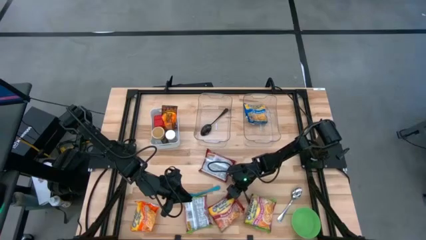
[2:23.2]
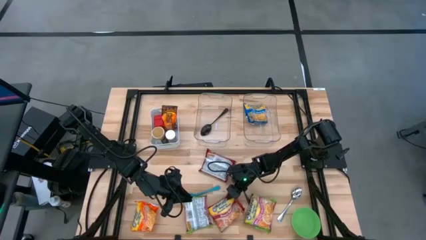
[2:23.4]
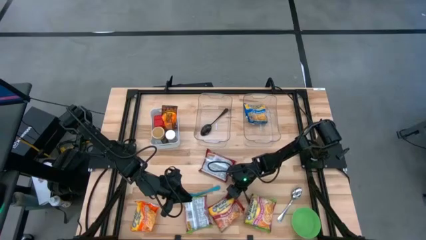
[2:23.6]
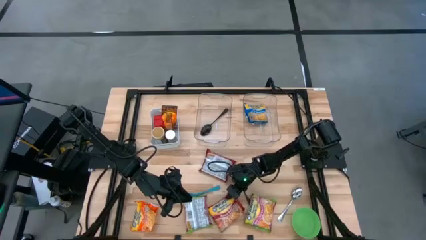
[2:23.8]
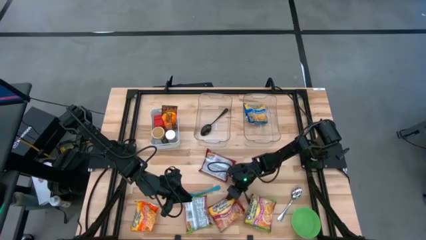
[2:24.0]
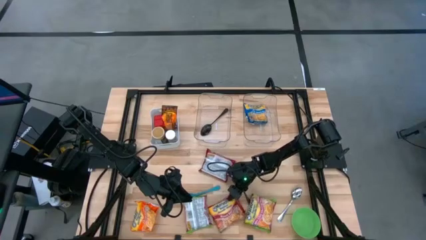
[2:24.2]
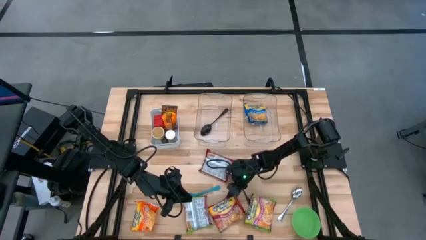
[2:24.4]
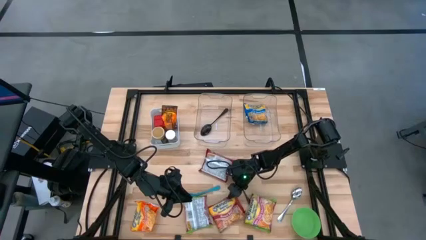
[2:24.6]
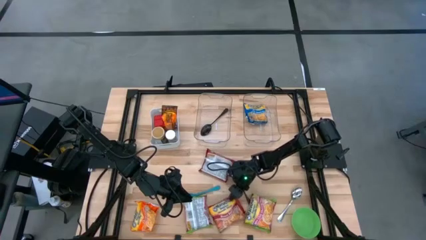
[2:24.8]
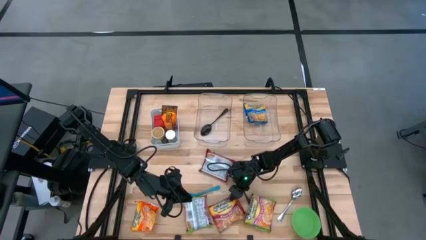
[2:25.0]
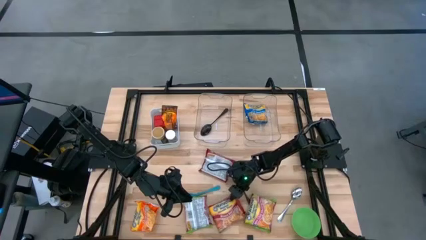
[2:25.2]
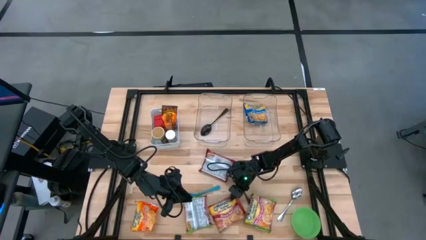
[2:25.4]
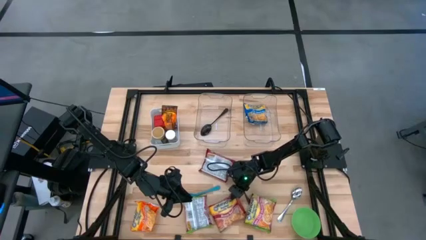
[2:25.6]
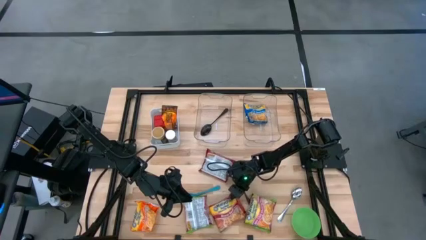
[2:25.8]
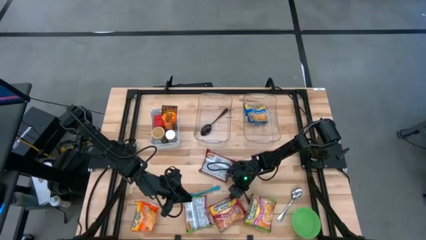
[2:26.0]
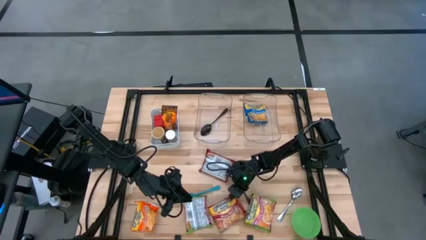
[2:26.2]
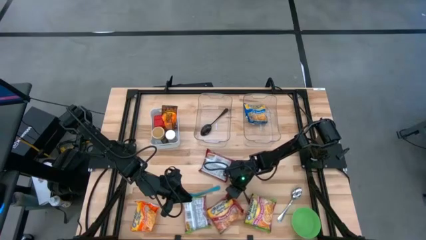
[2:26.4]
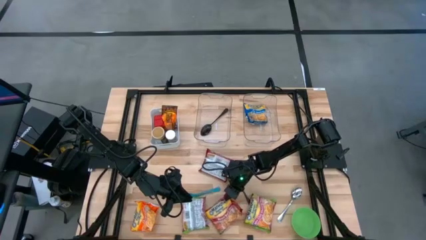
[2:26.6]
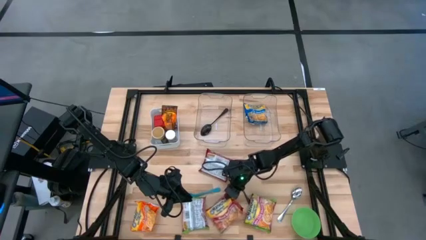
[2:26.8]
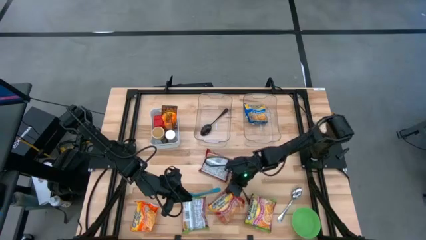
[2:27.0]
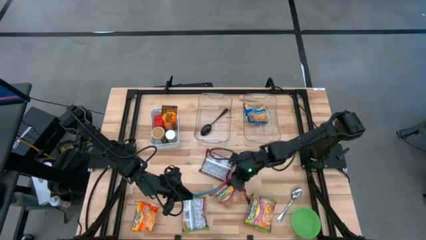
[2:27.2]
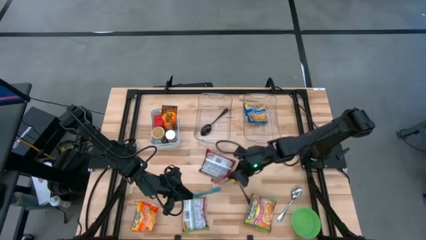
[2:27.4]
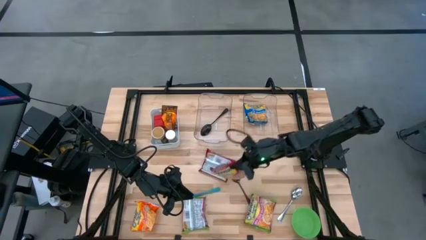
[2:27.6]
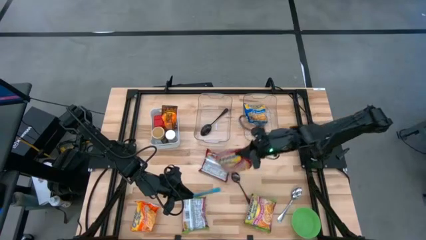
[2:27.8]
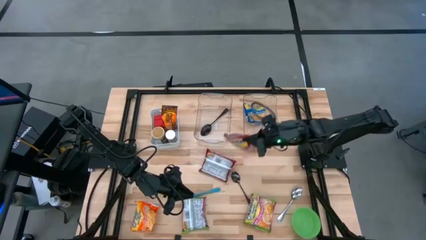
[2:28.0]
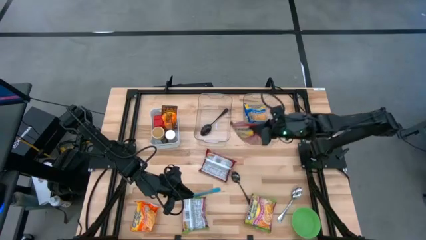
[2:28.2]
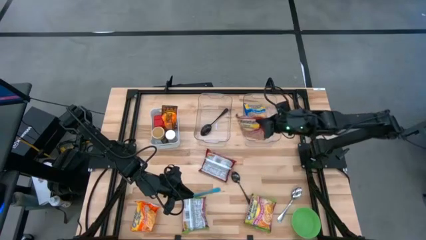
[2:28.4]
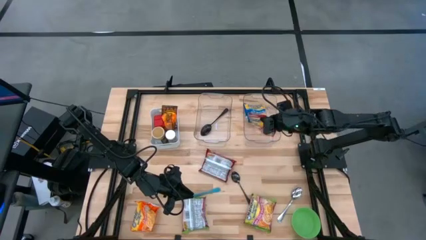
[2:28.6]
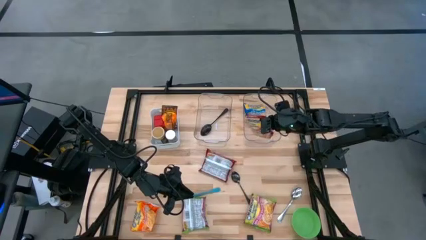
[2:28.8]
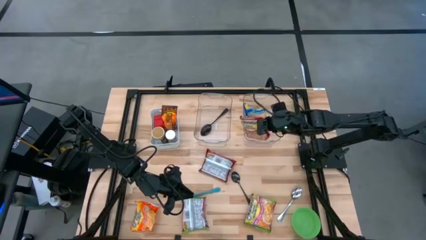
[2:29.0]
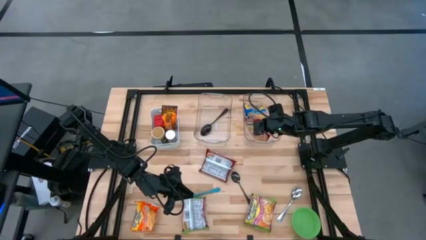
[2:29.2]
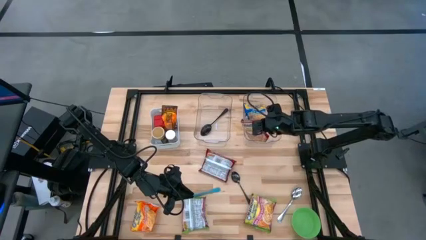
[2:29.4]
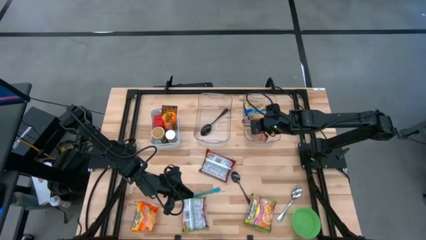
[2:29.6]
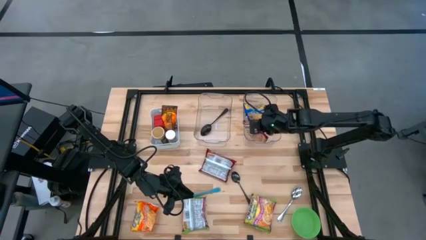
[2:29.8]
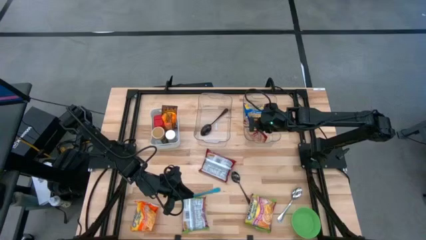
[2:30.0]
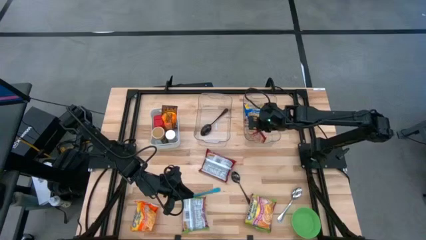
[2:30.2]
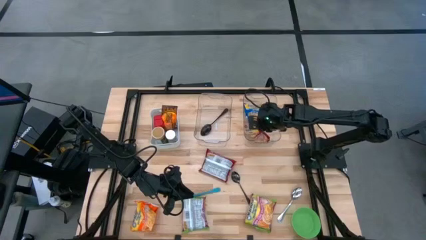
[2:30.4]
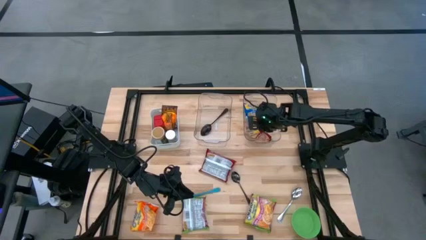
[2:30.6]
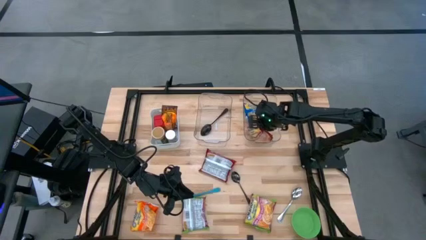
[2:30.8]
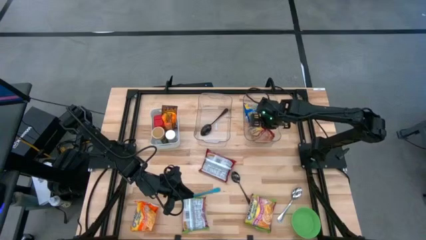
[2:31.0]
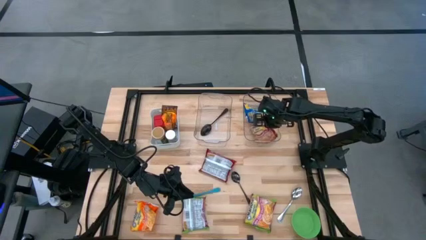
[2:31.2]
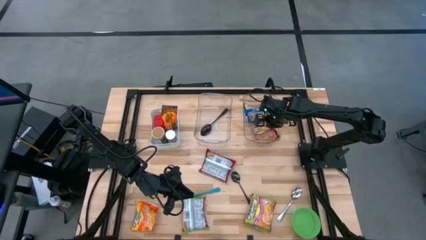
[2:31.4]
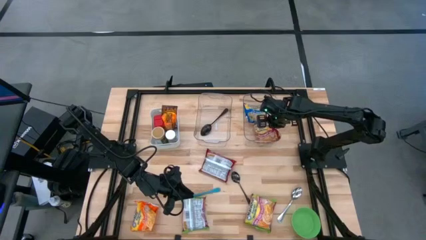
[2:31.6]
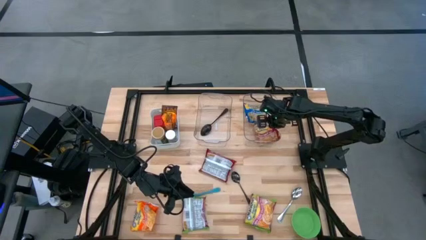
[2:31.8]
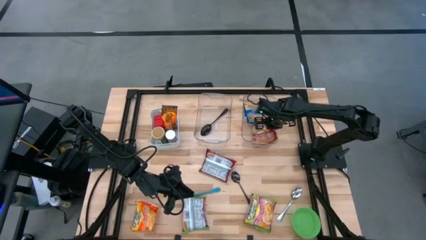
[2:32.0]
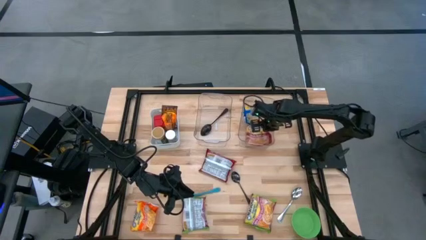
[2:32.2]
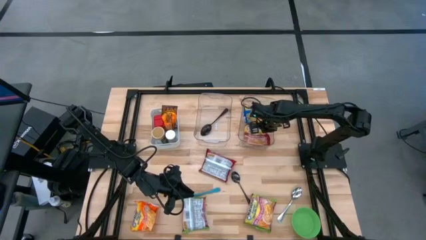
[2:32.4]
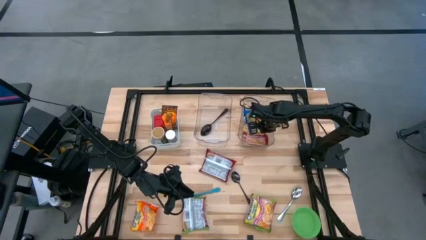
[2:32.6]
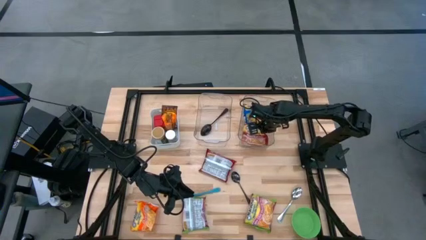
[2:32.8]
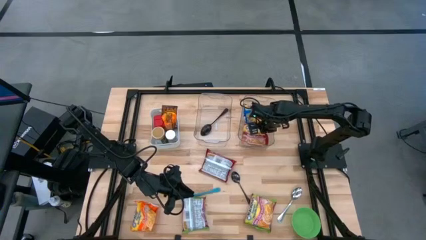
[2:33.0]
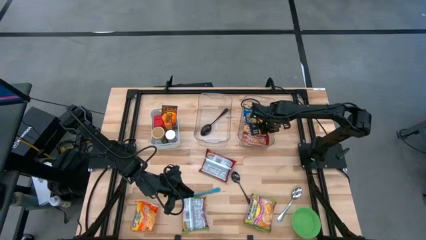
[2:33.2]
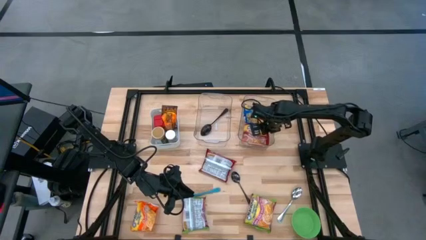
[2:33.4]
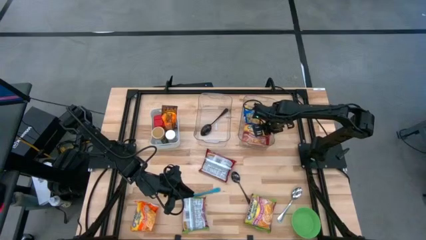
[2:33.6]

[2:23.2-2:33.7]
Task: Pick & Place Food Item
Put the bottom red noodle pack into the right transparent bin
